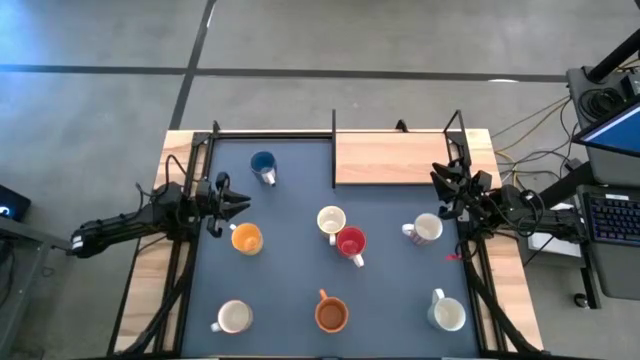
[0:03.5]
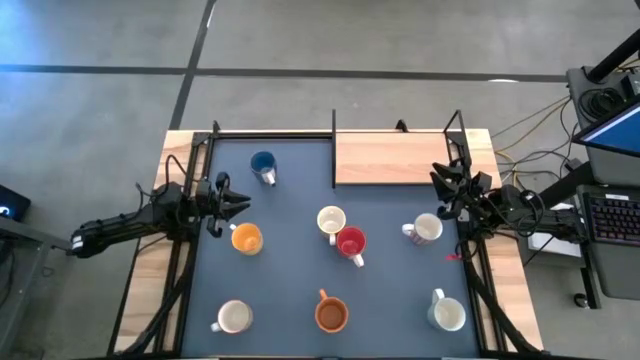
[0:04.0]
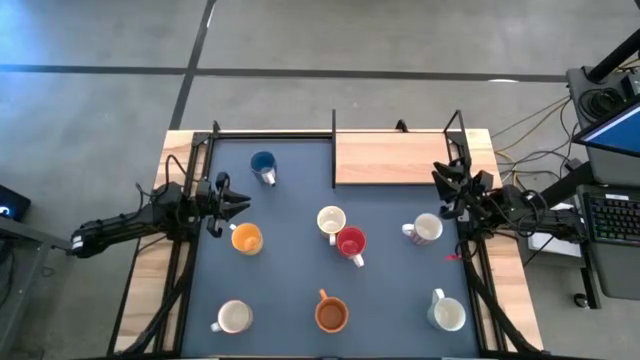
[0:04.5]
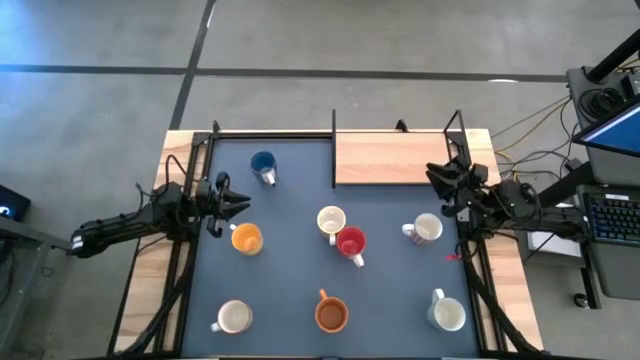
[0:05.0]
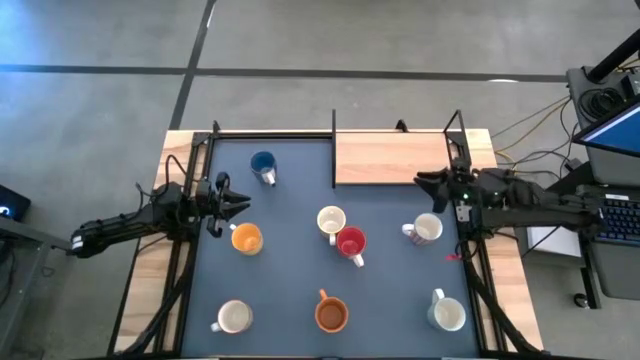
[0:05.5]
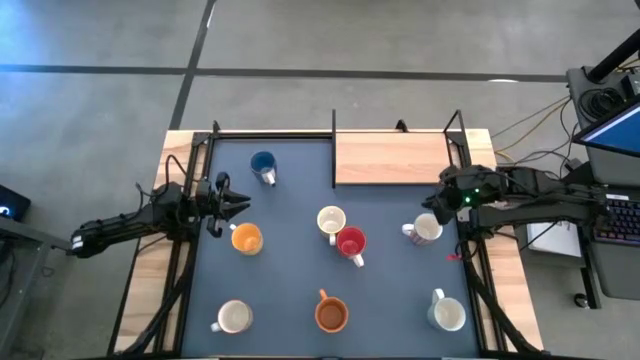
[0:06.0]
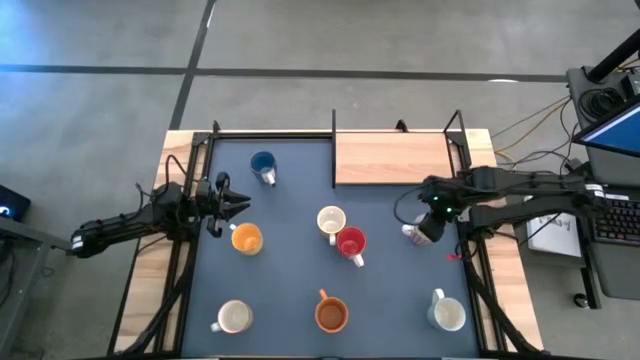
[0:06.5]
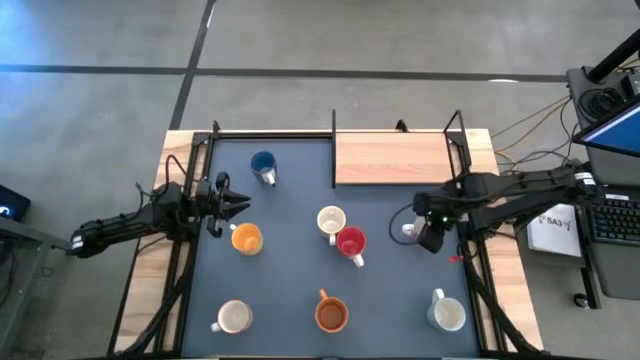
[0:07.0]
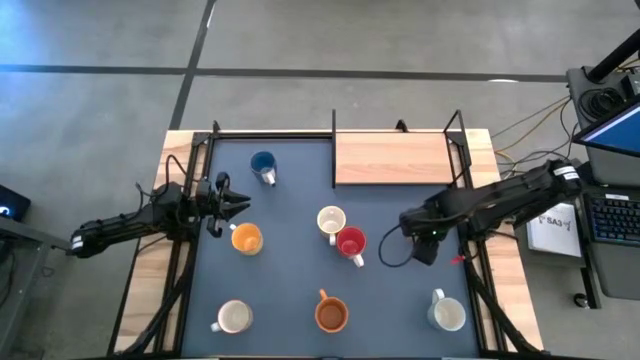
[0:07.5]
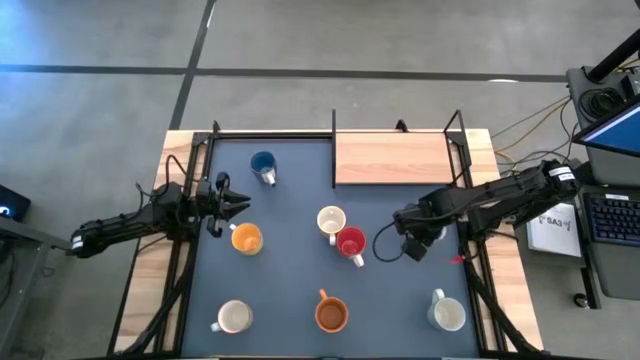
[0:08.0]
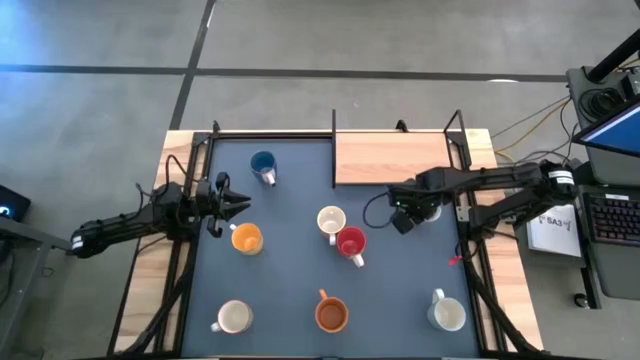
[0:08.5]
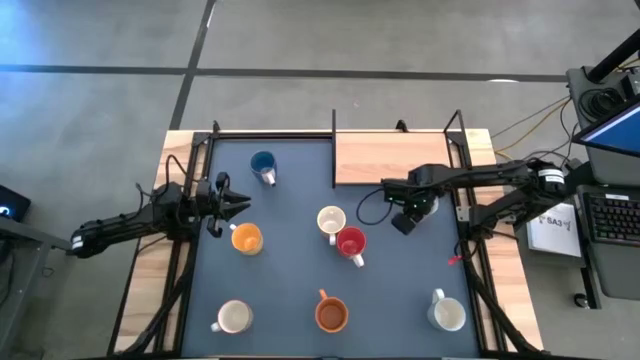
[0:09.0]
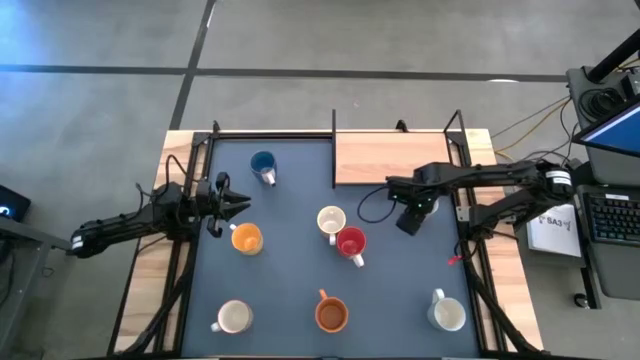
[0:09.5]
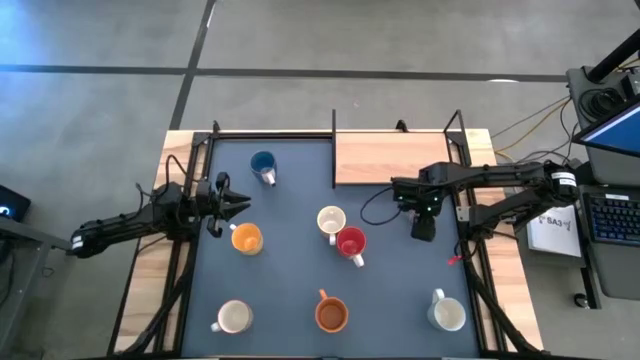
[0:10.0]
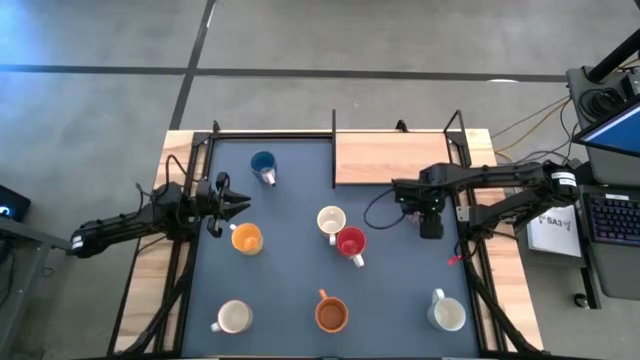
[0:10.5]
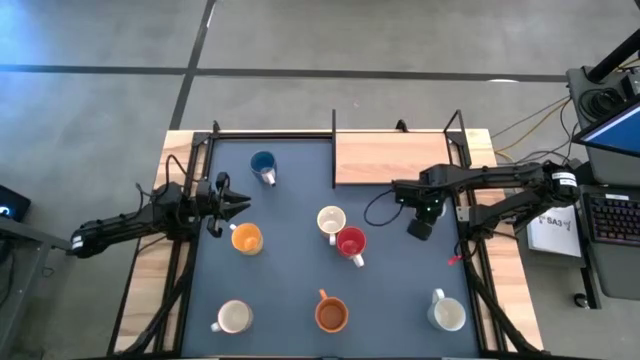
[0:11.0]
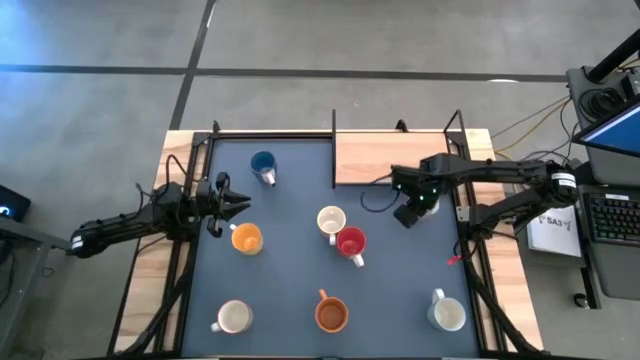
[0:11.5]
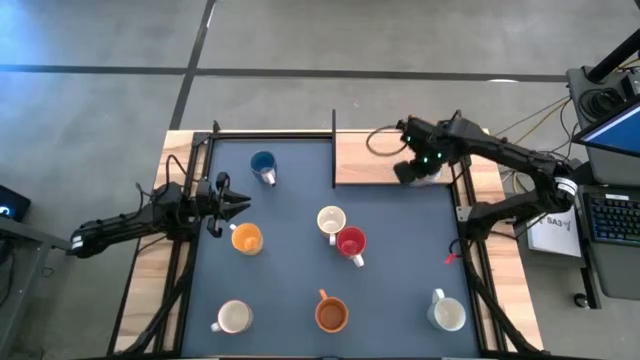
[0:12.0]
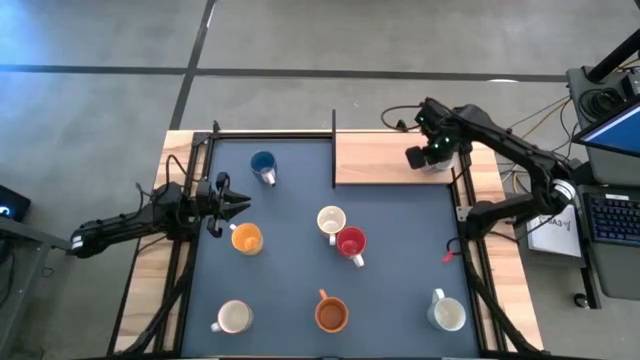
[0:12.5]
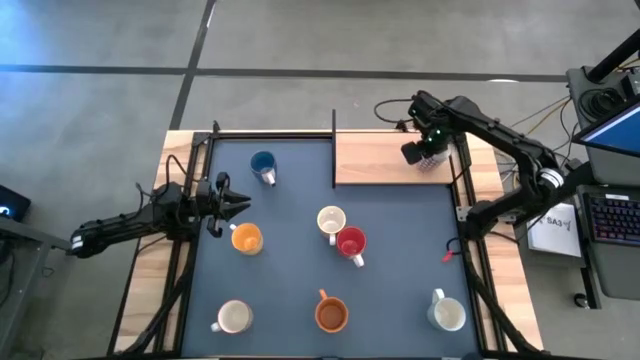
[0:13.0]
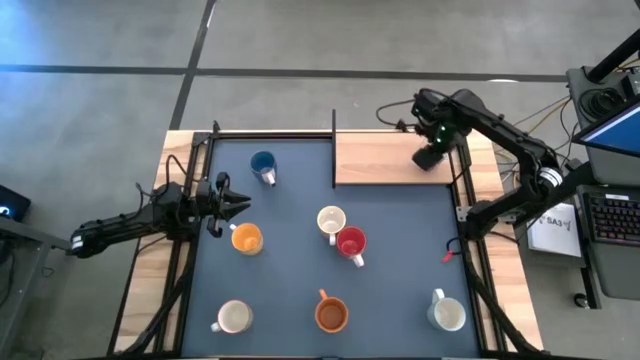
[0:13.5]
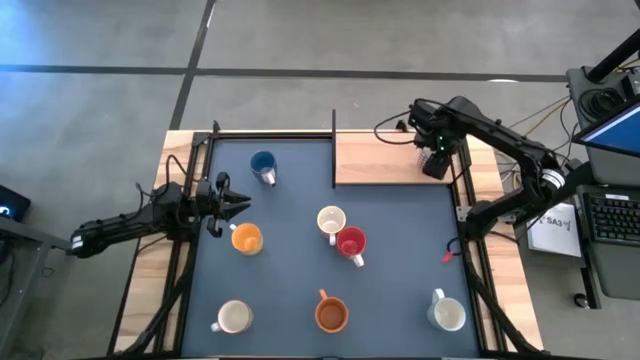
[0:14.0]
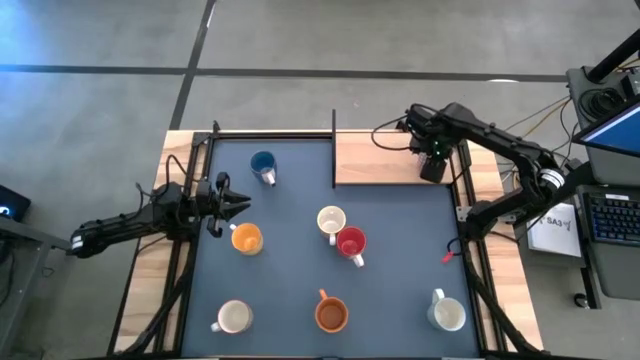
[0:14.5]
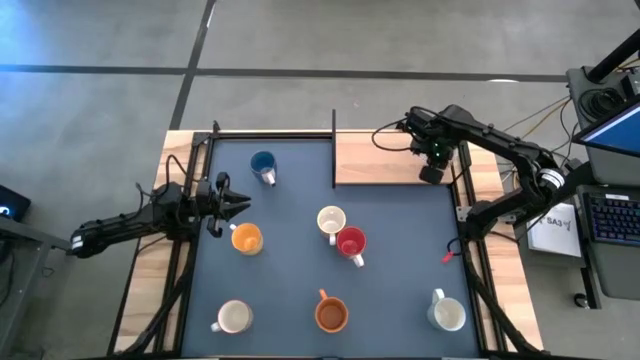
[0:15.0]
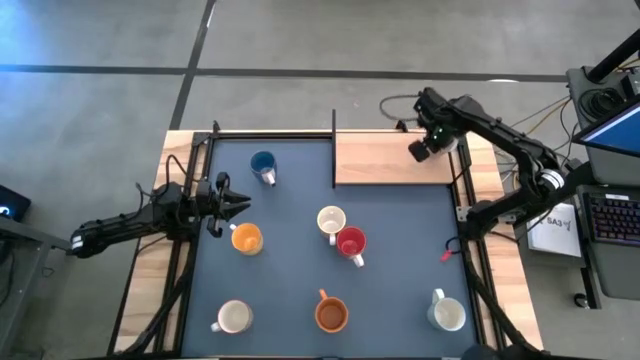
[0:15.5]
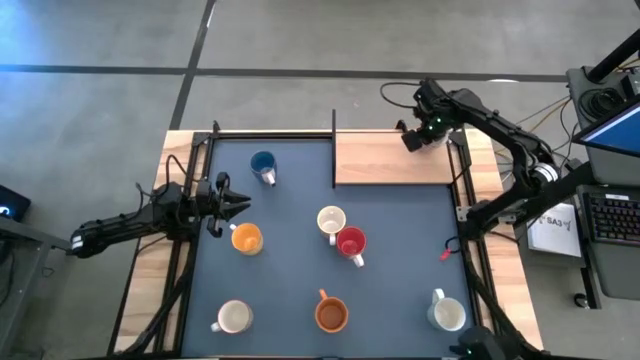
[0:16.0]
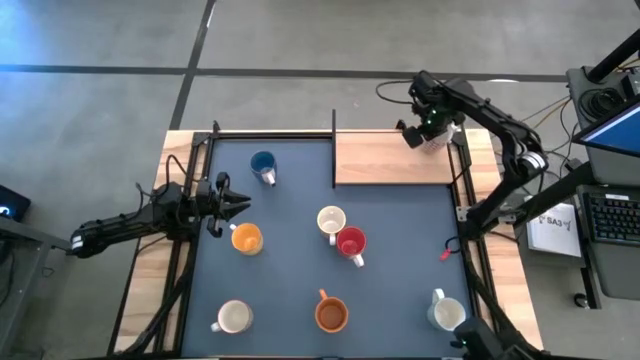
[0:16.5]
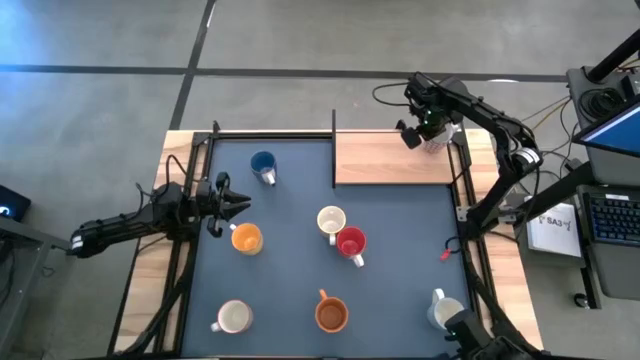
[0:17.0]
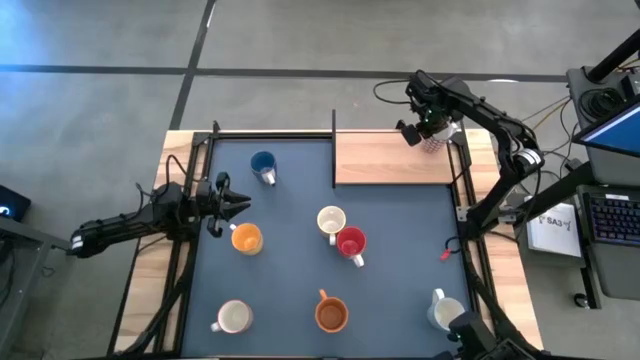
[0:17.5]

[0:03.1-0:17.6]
Task: Place coffee mugs
Put the red patterned mug on the shelf

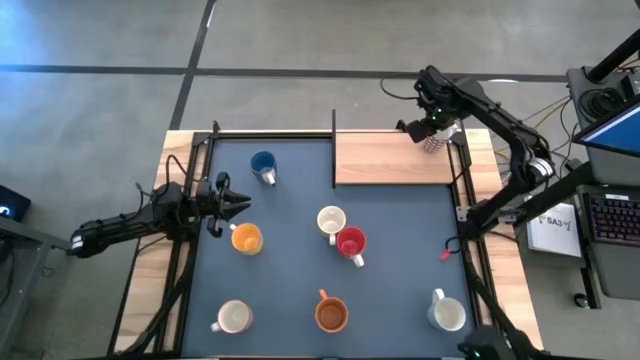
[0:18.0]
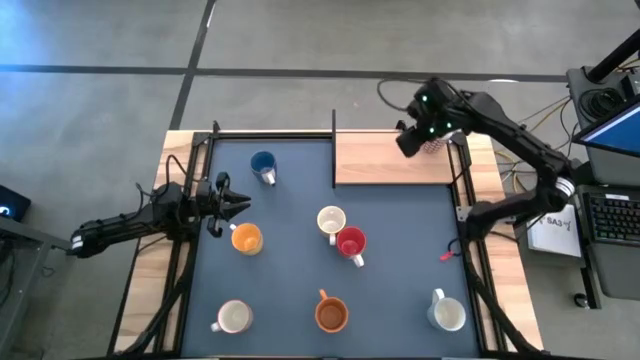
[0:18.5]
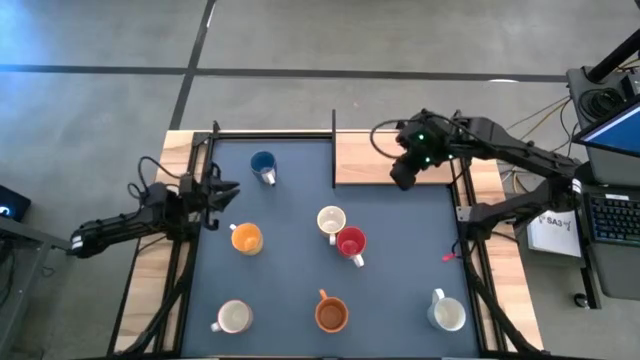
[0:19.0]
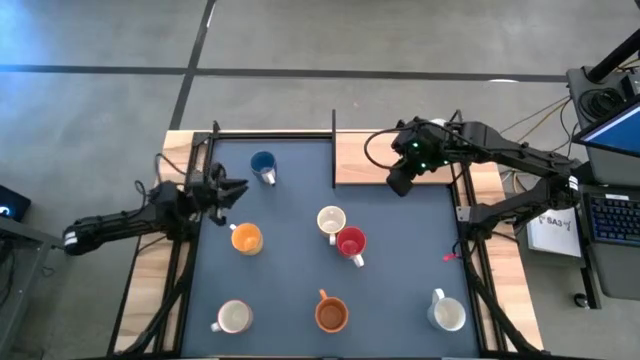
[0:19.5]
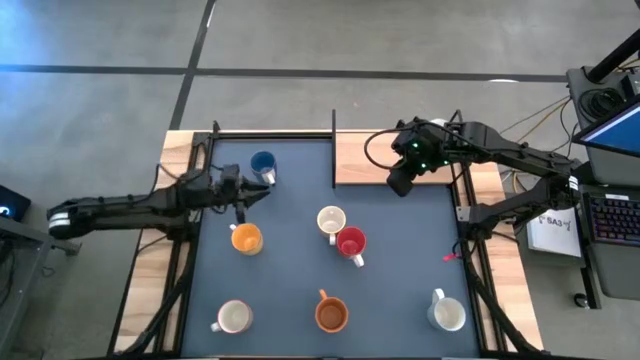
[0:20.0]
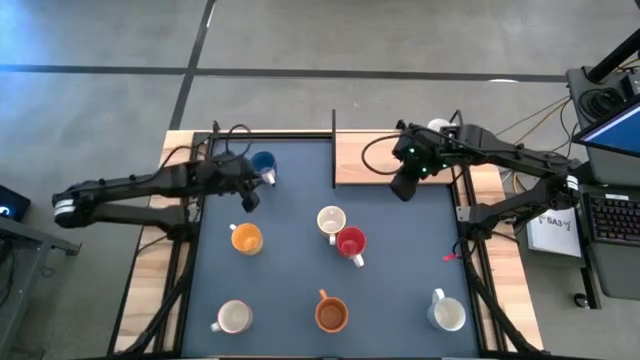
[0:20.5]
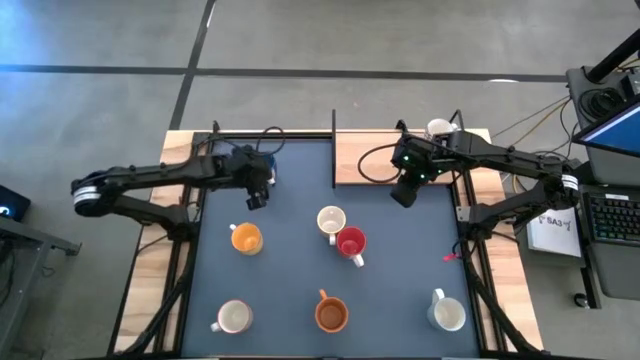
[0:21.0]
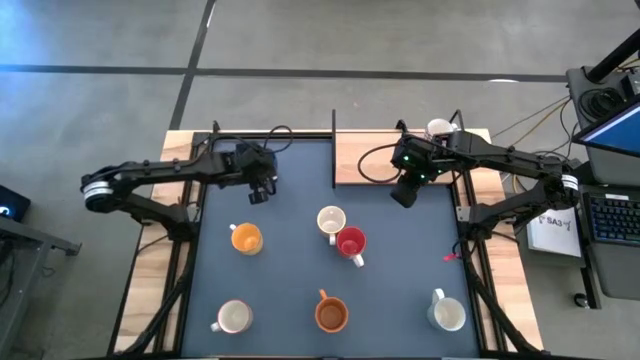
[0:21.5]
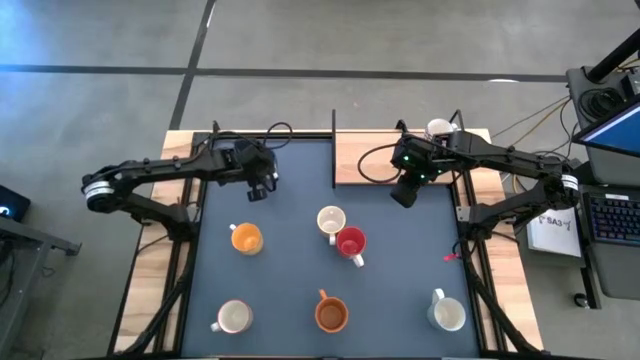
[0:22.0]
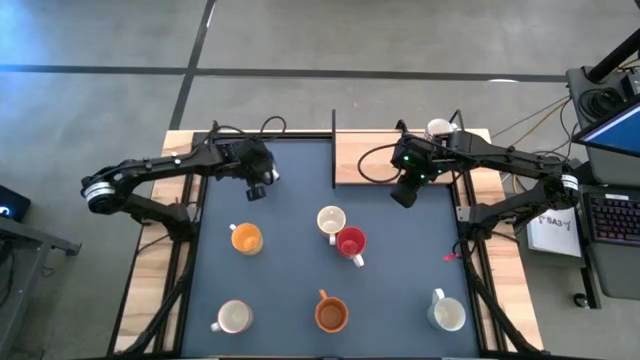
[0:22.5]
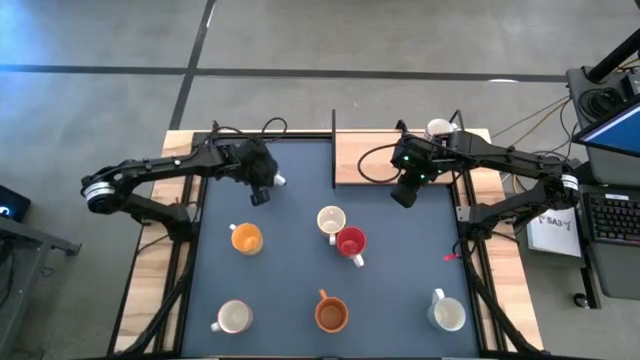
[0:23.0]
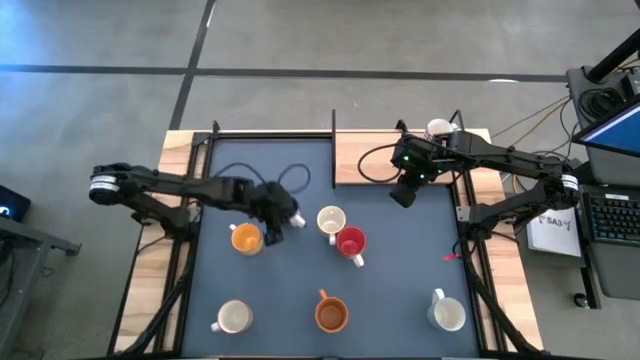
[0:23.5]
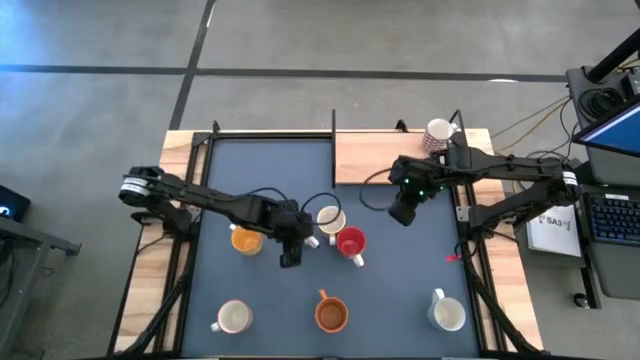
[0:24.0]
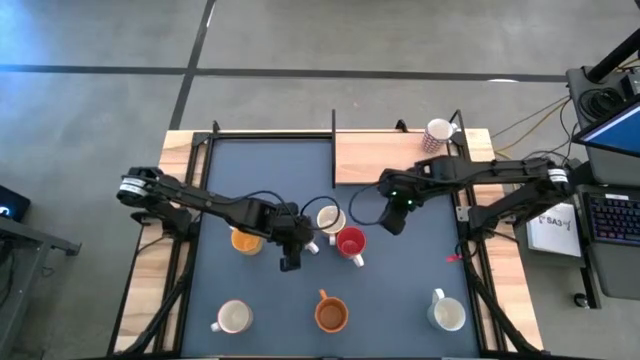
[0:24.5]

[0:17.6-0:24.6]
Move the blue mug to the center of the table
